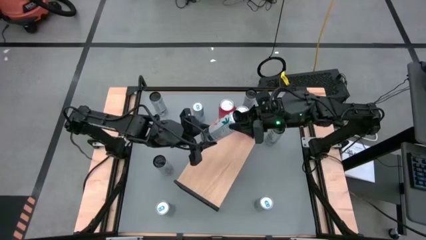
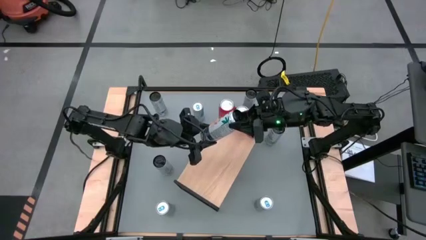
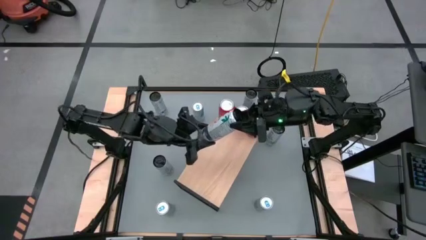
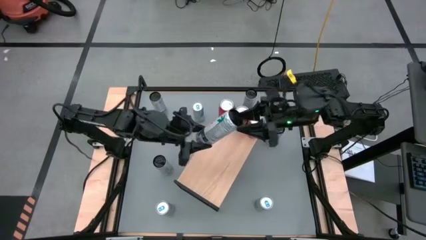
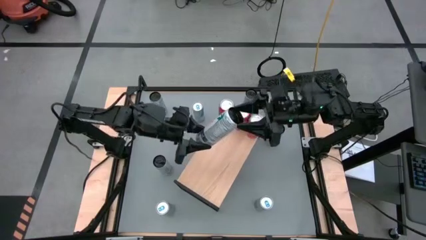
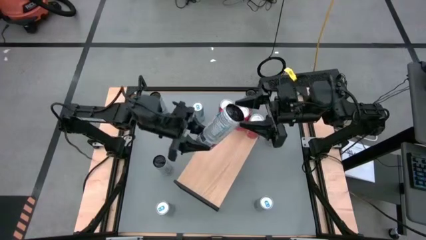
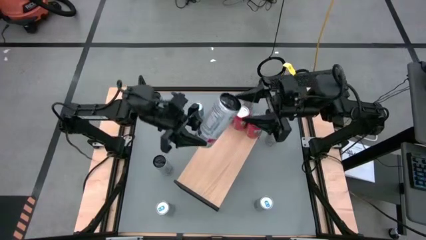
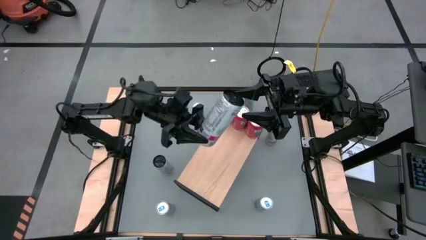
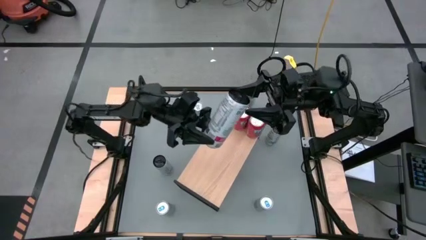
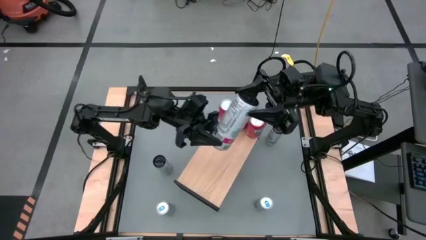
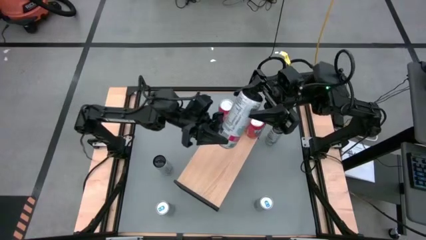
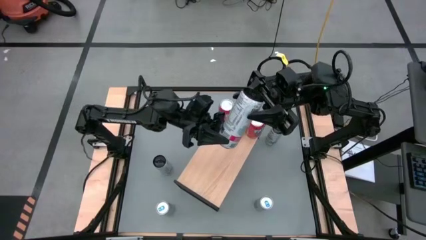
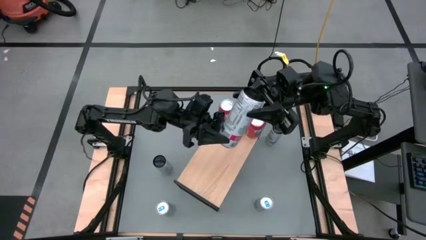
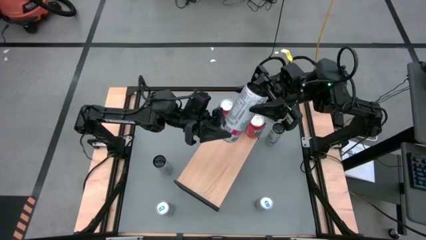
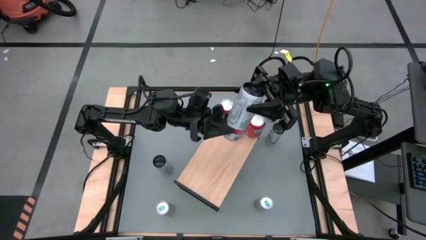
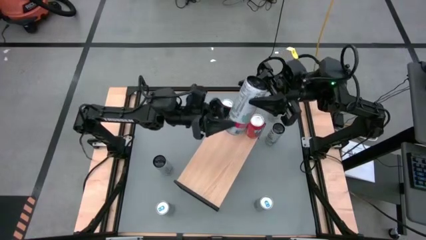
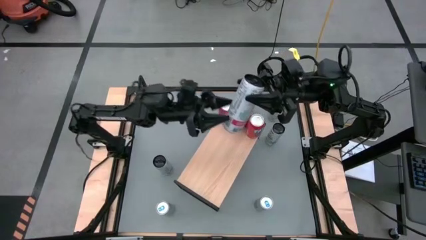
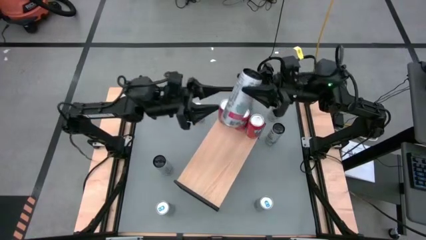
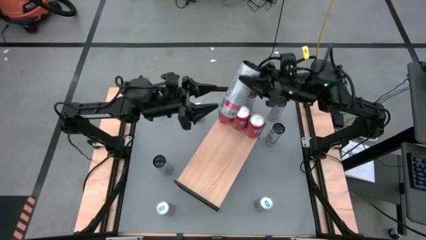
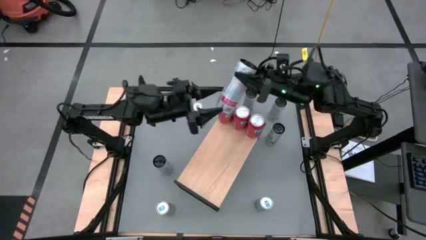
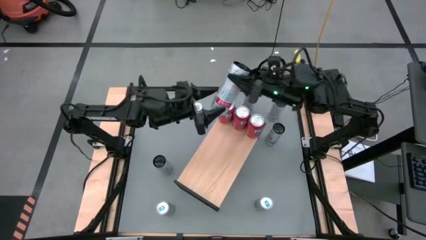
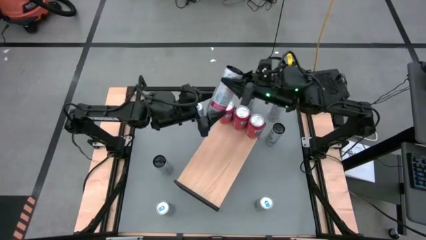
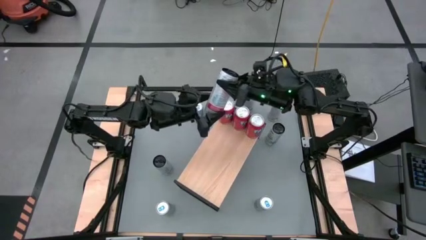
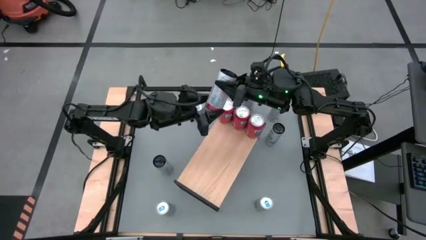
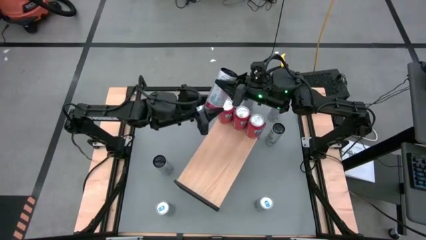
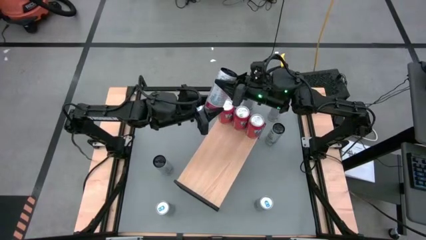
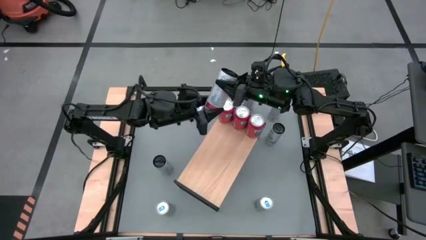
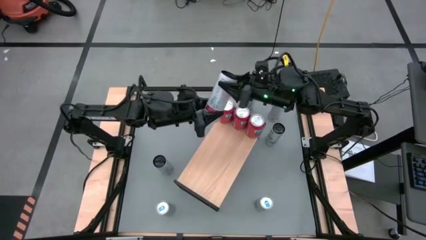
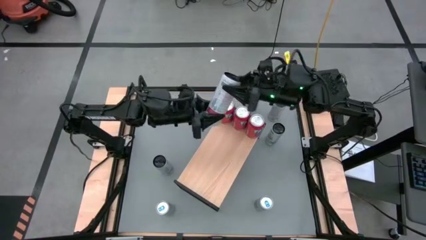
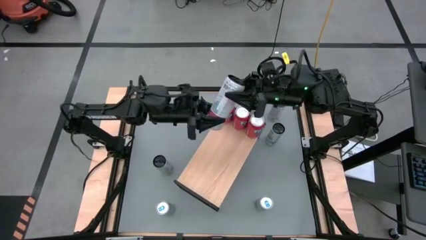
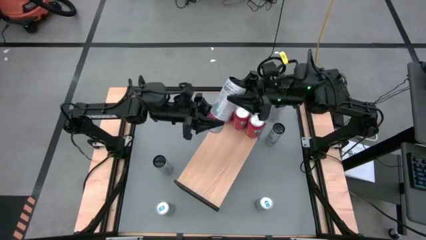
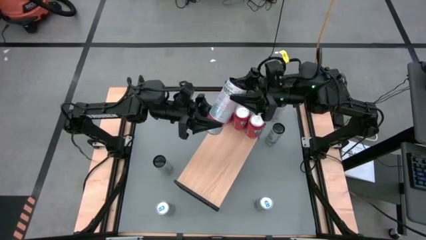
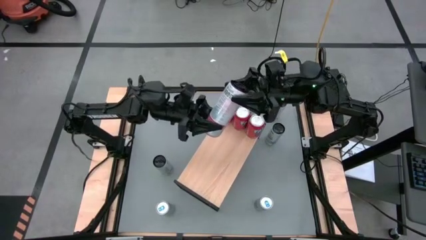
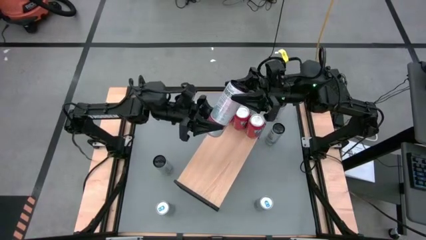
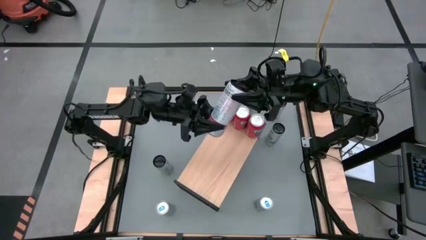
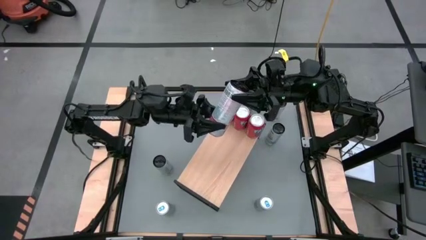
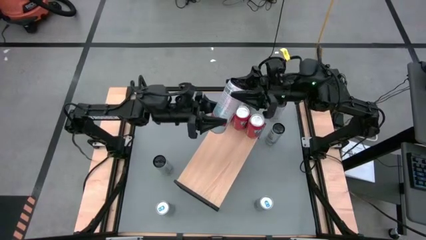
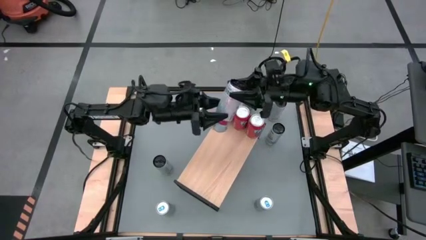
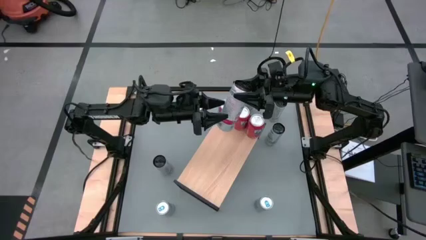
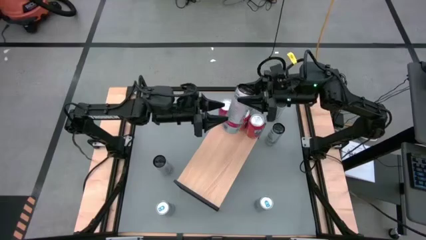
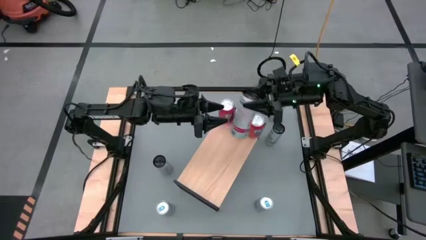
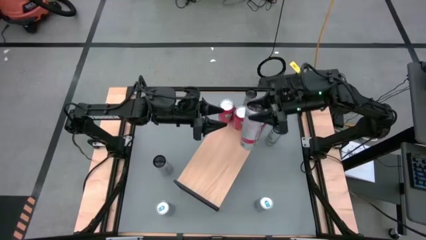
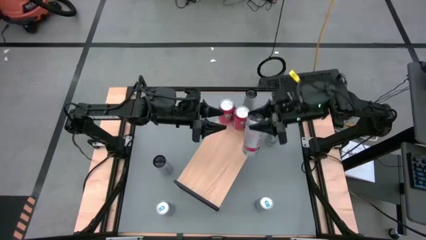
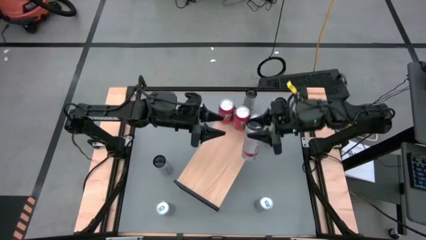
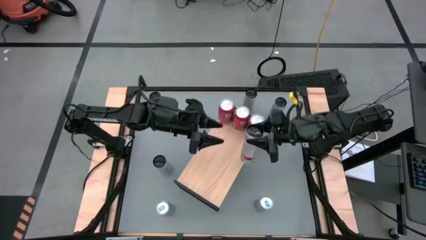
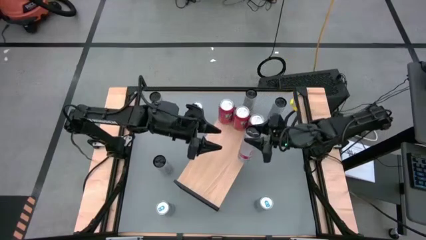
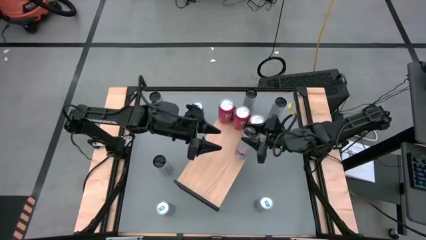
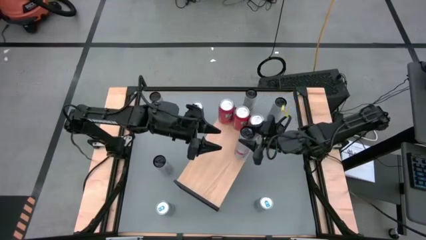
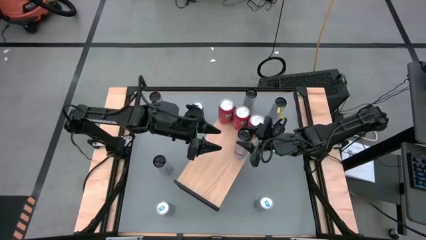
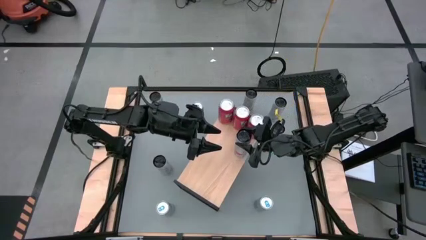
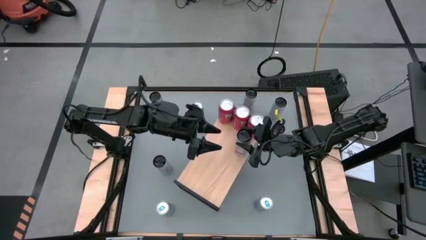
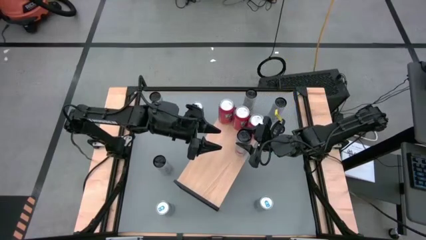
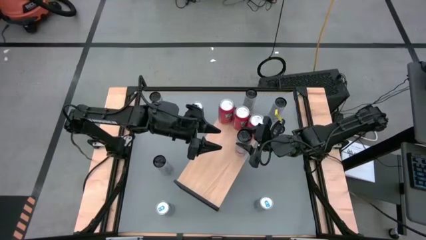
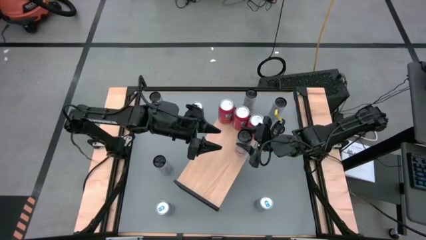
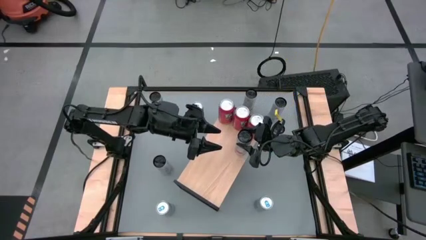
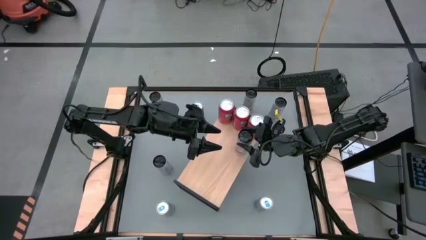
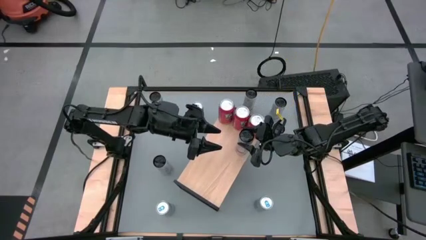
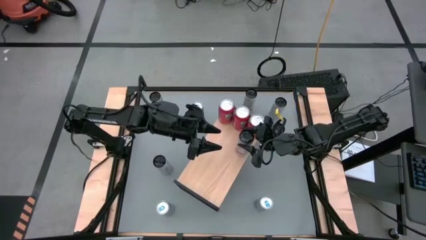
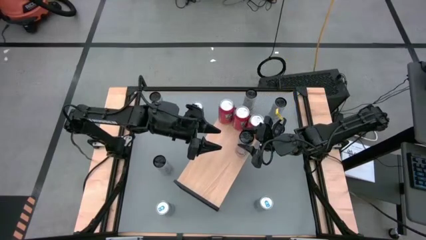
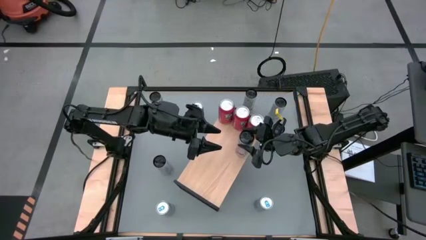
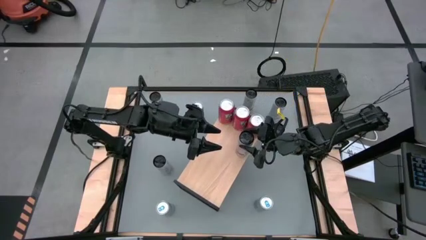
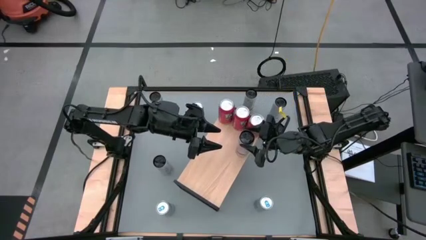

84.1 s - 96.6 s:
Task: Place canned beverage on shelf
Put the white pink soda can on the shelf

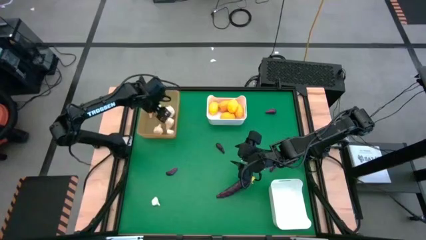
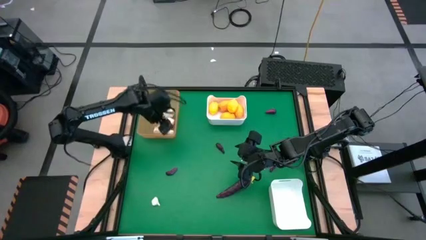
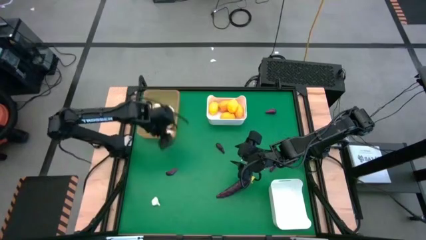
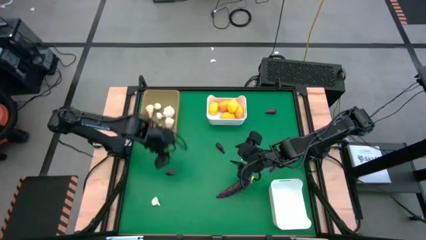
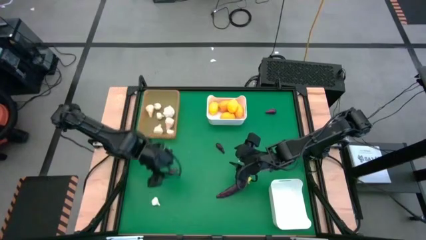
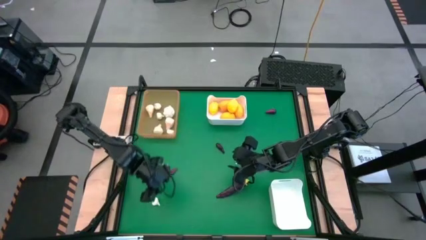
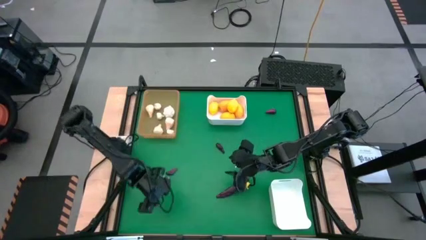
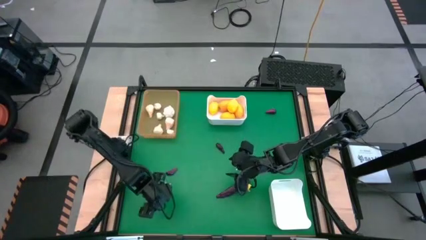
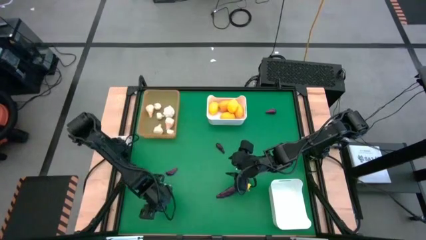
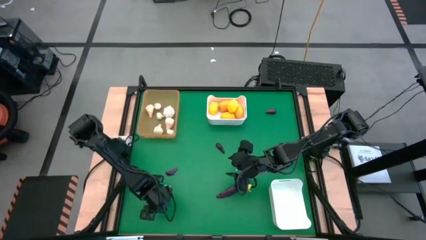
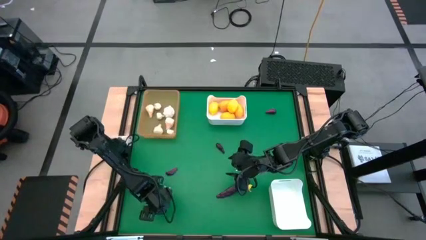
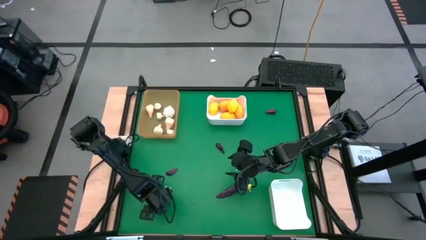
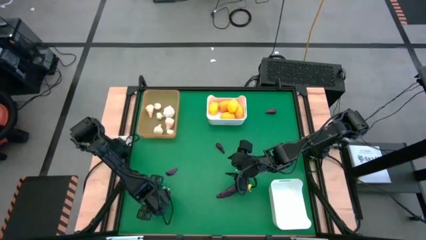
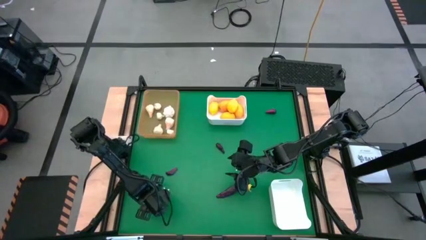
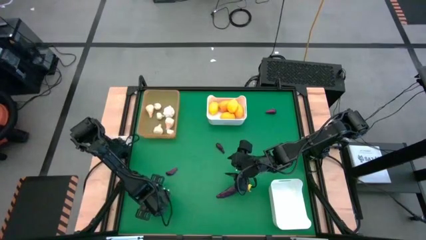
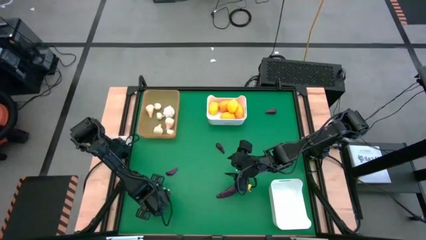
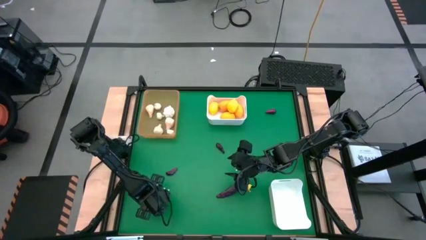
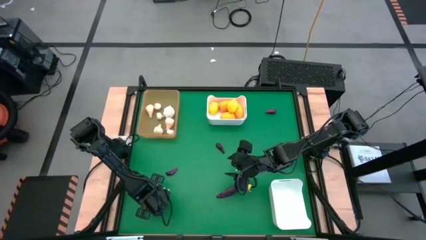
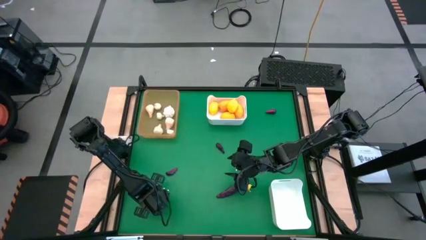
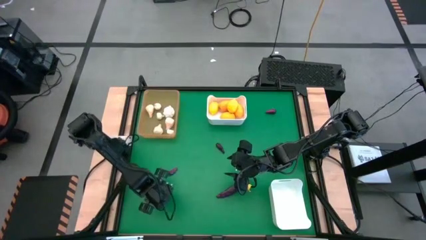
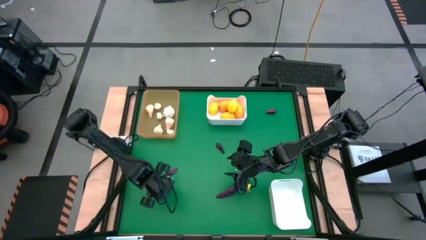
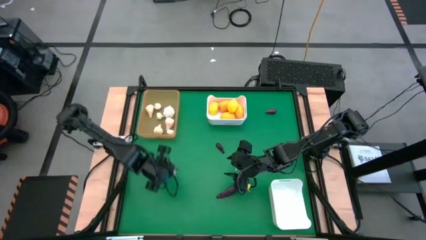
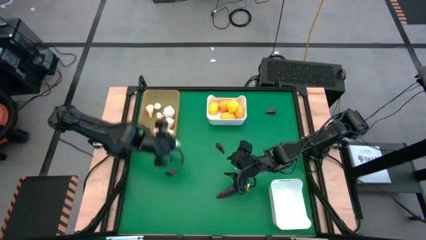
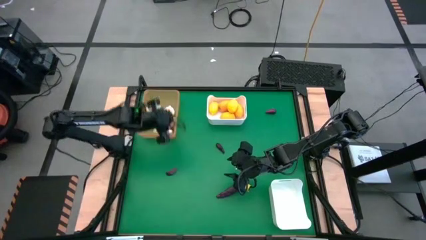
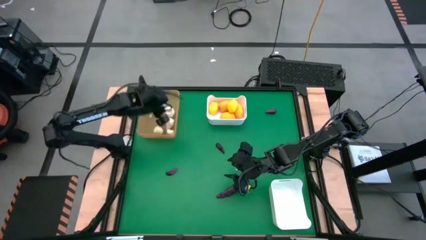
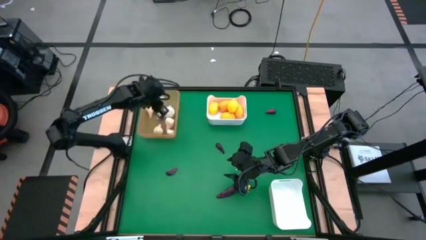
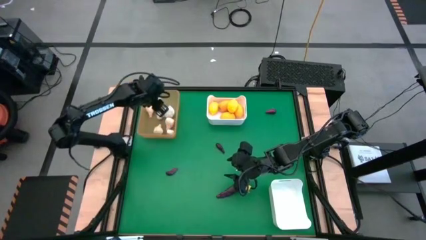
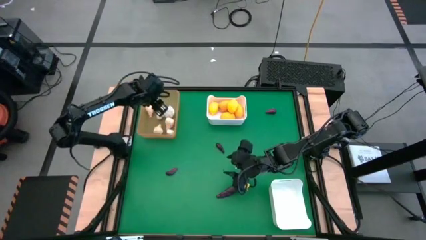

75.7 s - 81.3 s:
Task: Sort produce into baskets
Put the garlic into the orange bin
